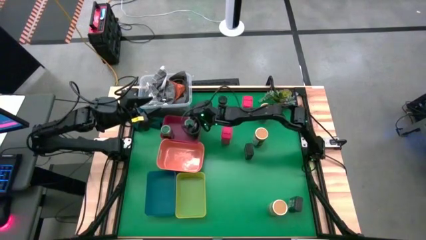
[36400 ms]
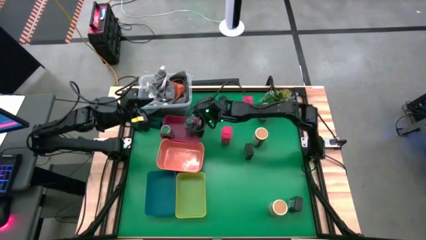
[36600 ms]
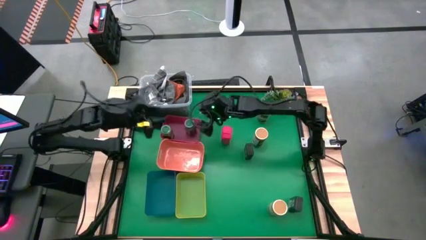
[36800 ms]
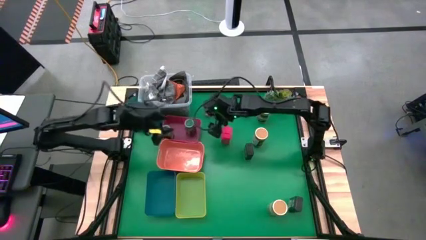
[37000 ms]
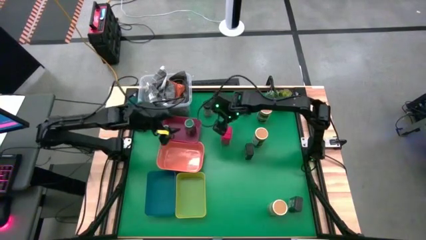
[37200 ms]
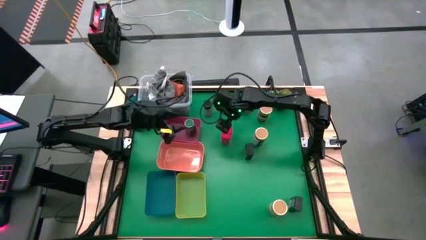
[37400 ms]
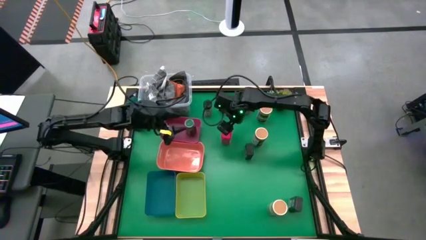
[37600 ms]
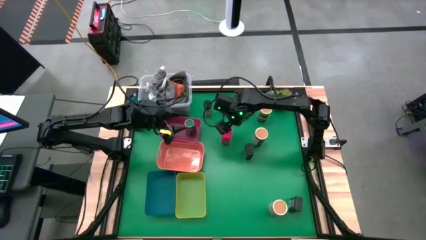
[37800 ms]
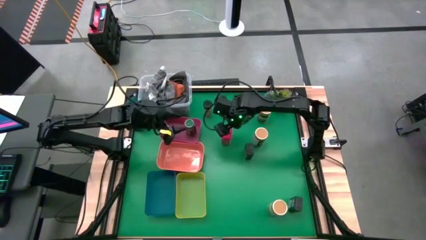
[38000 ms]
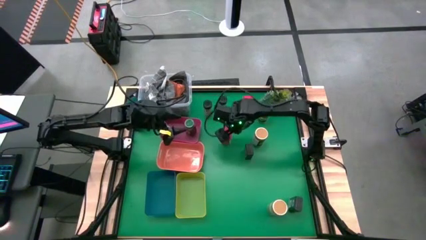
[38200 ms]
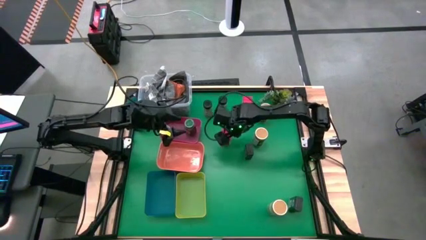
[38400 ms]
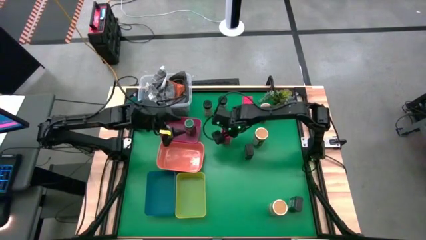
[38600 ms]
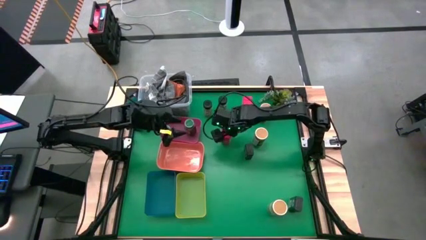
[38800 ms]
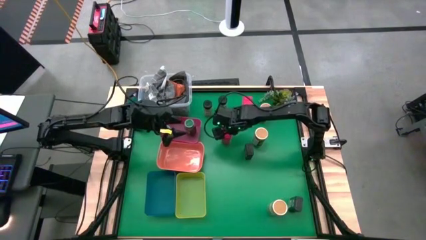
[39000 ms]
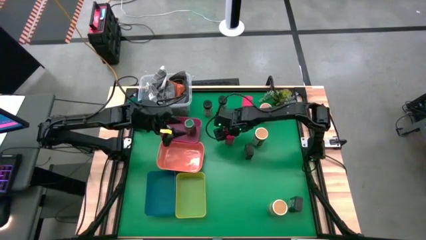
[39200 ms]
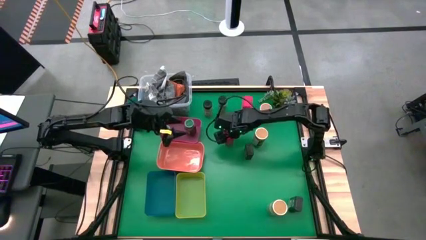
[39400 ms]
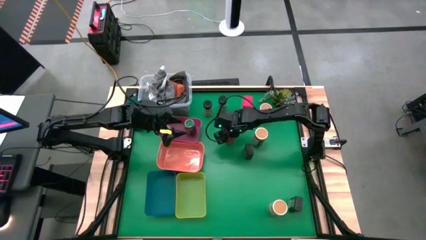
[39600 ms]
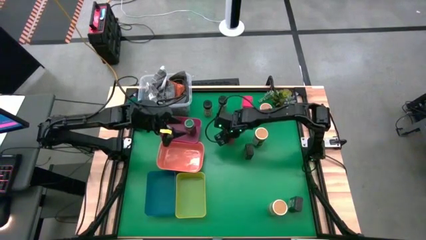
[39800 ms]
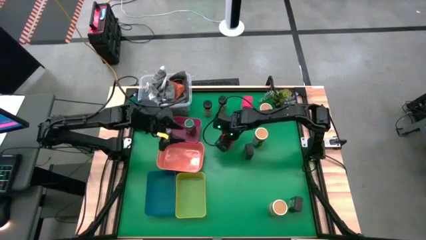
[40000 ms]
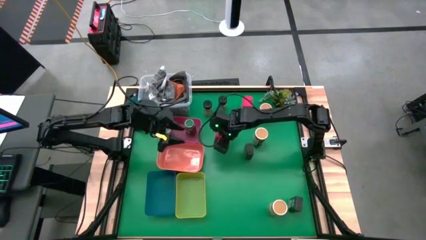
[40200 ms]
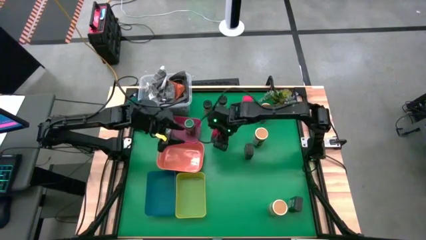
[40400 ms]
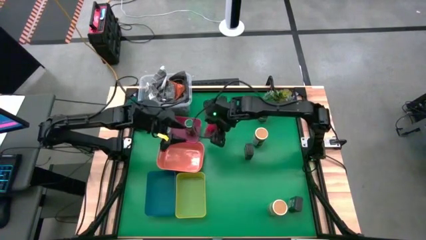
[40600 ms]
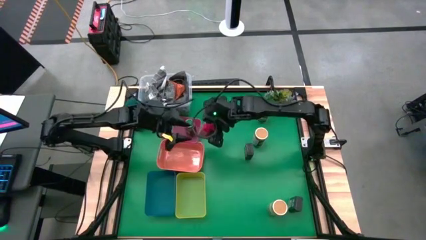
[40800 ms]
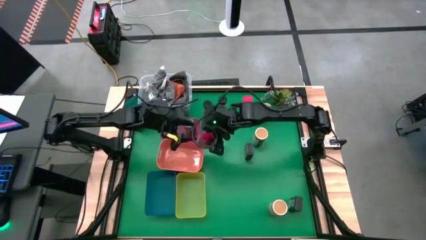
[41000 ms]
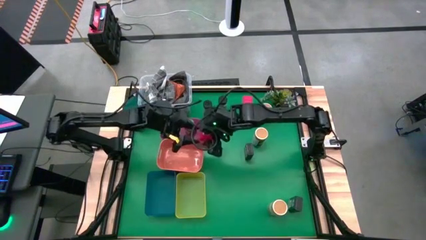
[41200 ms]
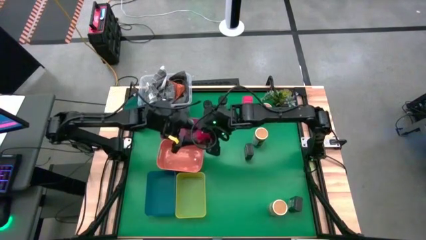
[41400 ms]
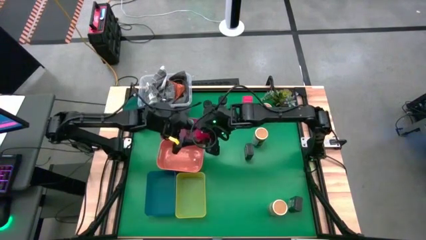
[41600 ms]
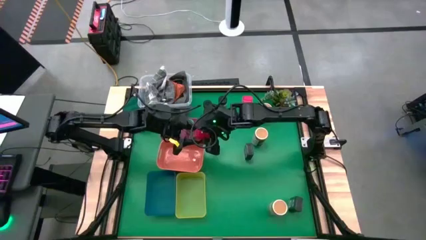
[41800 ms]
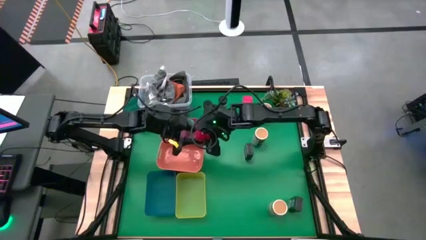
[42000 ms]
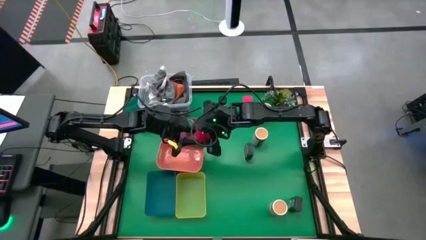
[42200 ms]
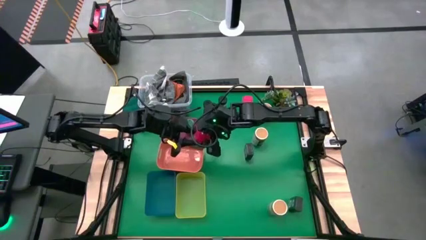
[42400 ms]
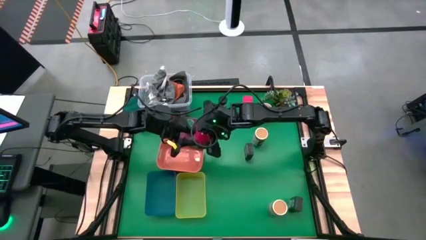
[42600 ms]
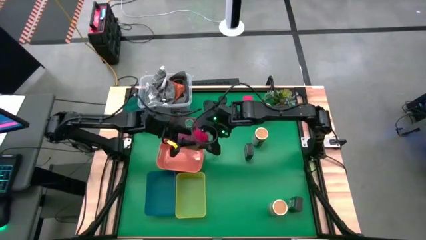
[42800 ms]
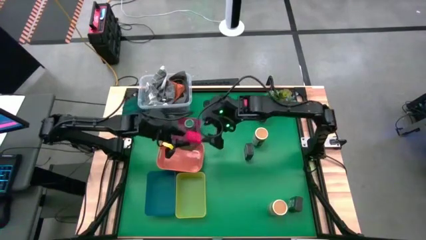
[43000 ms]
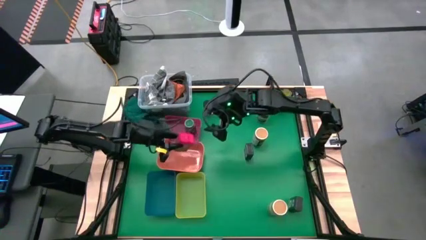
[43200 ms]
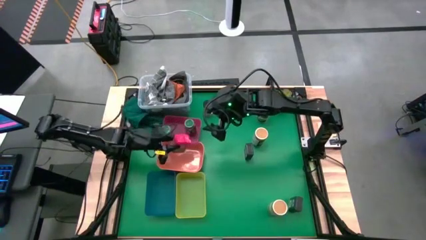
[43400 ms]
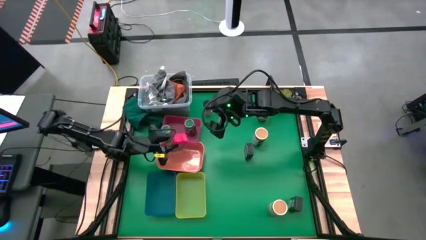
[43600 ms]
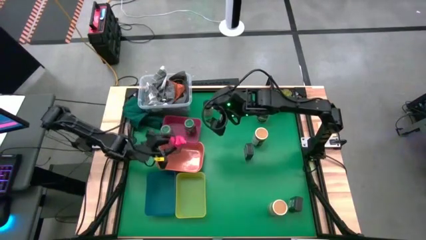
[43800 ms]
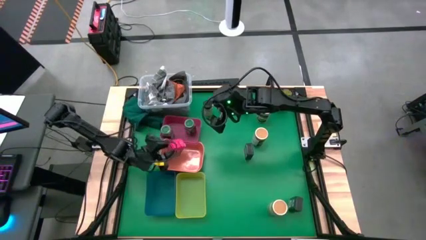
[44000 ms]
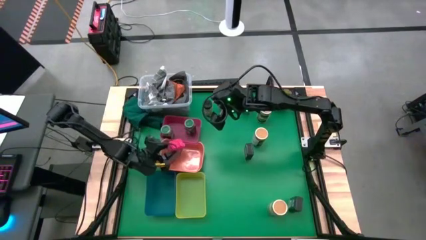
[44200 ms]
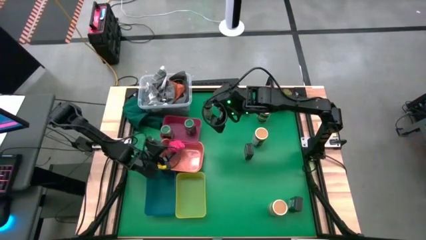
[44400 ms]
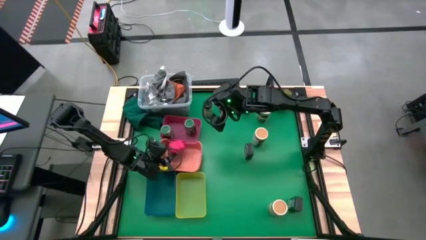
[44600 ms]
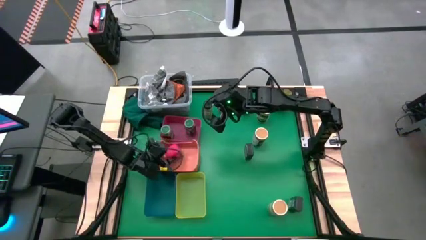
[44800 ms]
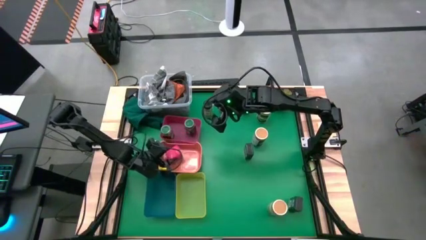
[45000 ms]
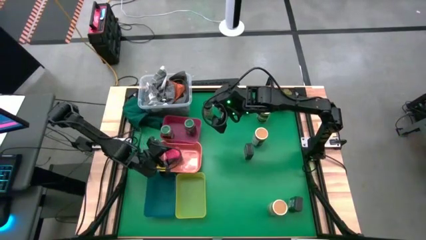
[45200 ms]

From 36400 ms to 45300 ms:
Task: Sort spices by type
Put the bottom red seasoning can into the orange bin

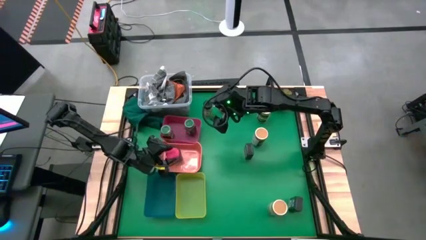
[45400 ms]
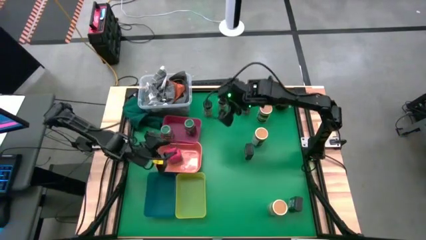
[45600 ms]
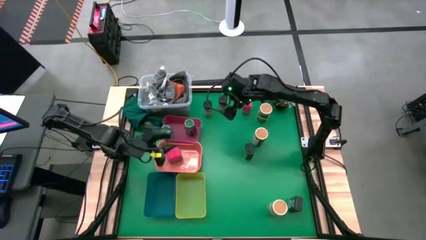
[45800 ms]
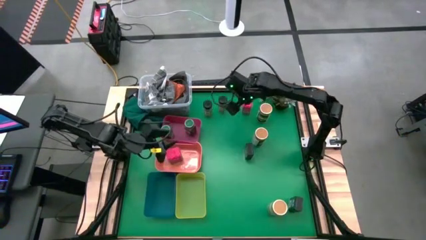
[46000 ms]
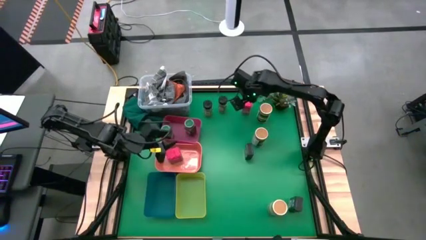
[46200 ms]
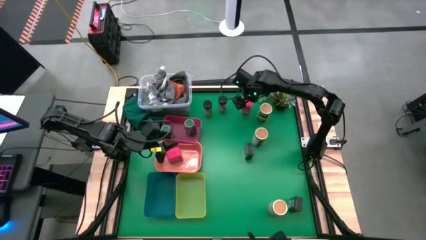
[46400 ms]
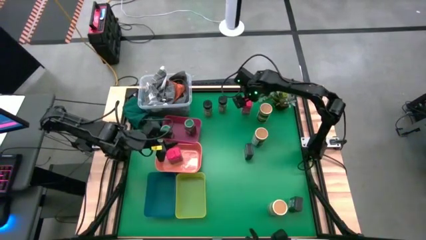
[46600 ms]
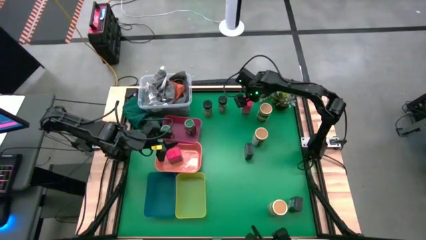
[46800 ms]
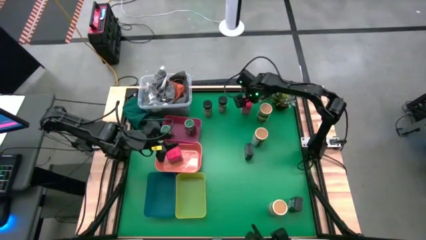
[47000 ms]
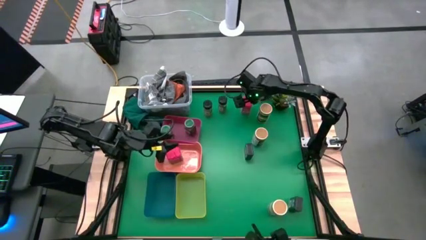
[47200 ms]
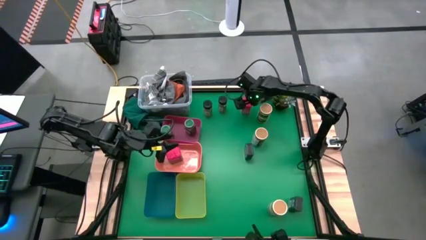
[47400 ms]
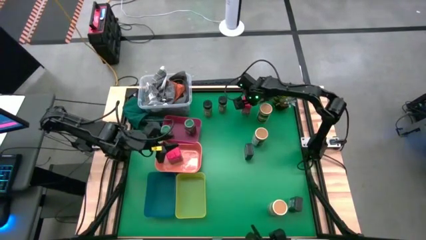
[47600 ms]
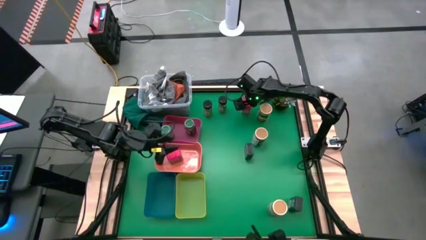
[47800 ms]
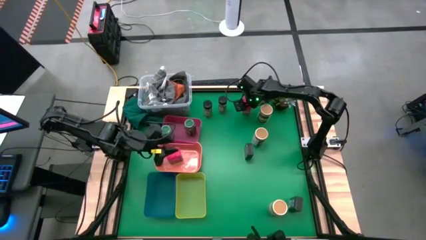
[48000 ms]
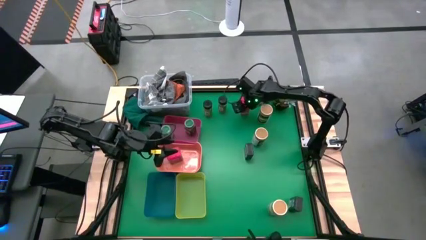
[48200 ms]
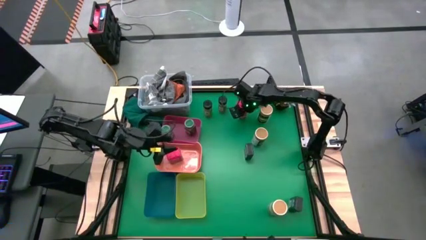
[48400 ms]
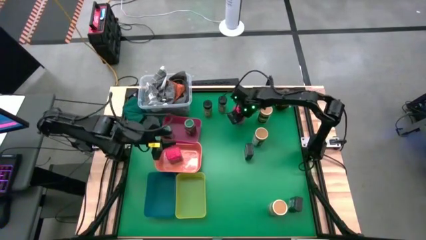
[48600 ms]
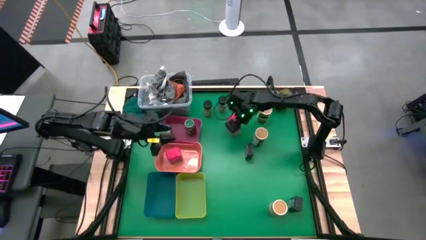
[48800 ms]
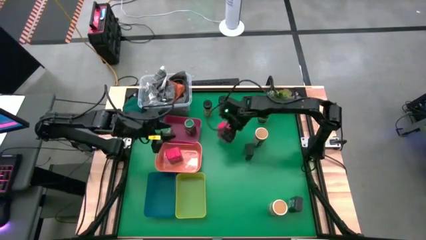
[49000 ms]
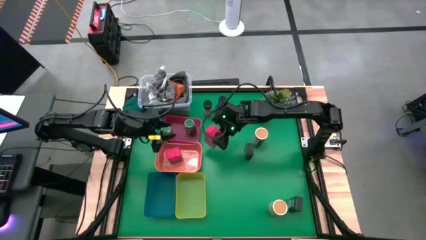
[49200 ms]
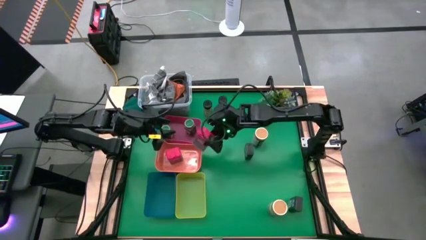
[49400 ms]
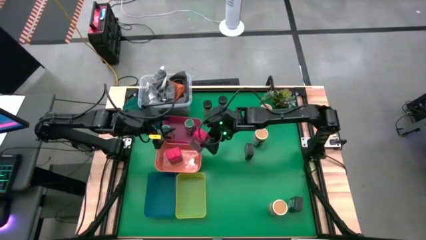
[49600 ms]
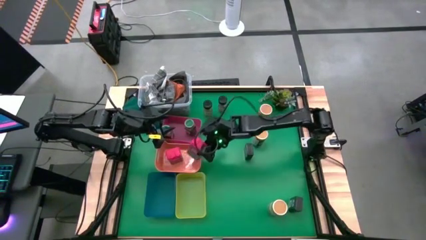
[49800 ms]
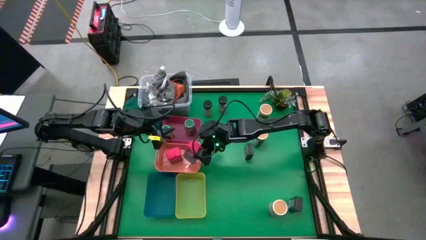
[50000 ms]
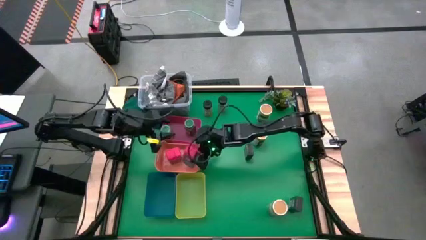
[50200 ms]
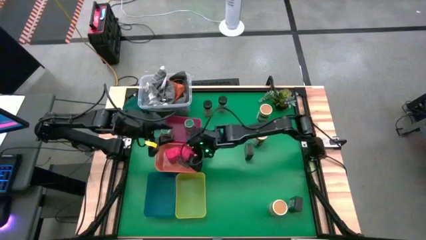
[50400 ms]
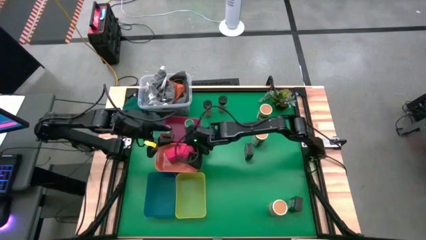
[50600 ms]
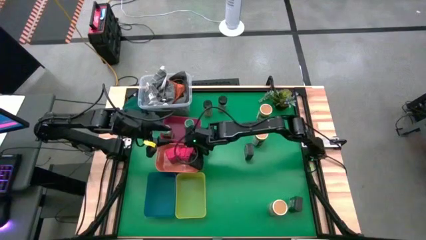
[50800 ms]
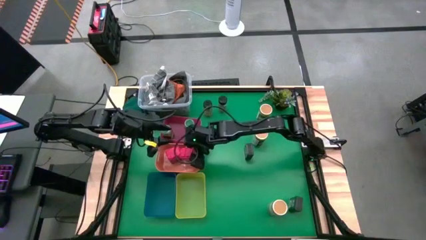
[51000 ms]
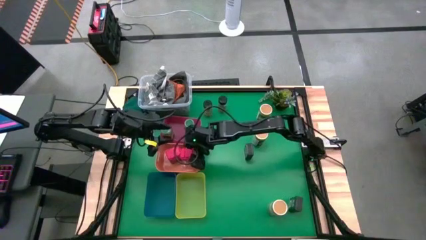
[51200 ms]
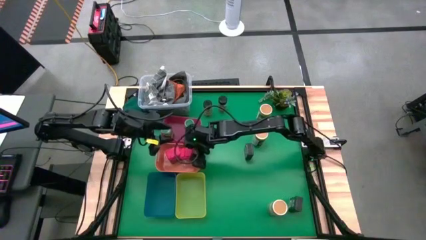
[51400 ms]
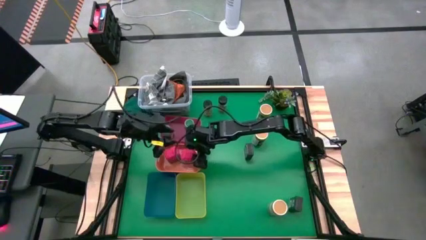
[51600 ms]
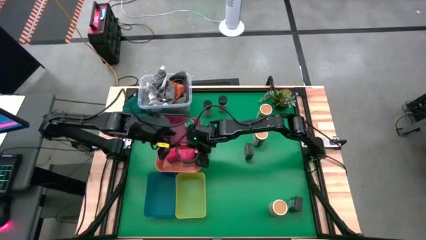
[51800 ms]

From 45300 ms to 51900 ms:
Put the red seasoning can into the orange bin

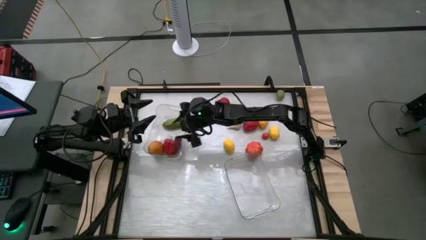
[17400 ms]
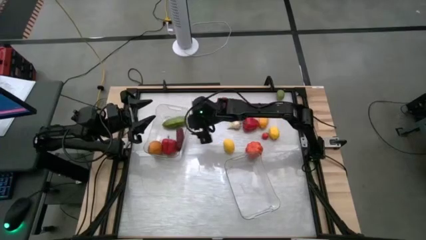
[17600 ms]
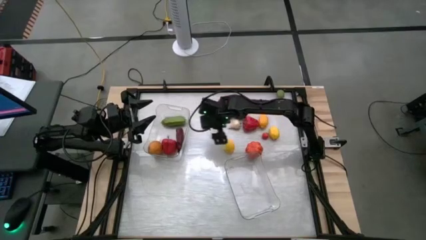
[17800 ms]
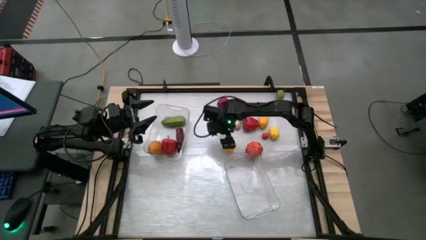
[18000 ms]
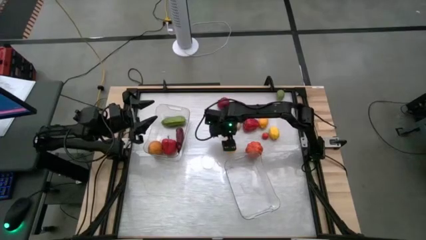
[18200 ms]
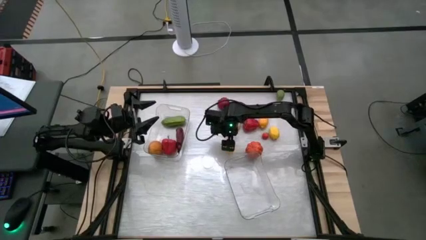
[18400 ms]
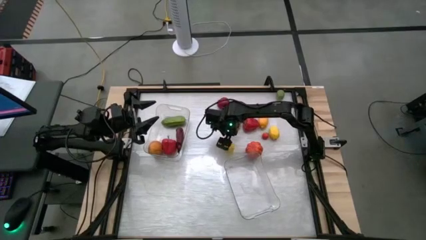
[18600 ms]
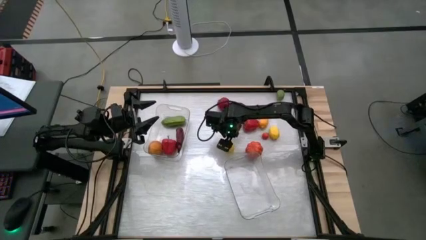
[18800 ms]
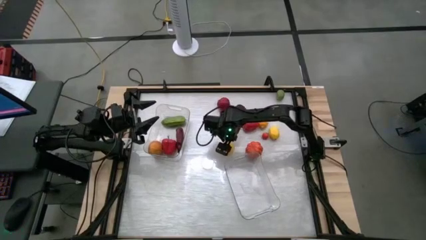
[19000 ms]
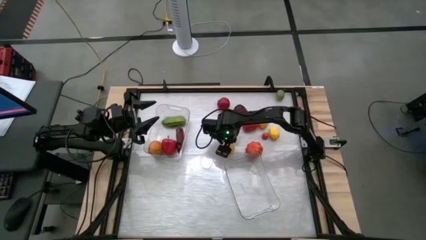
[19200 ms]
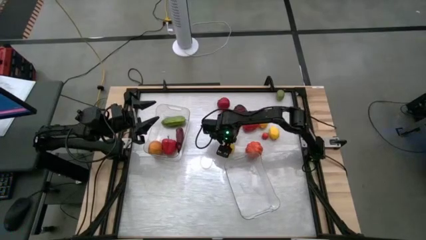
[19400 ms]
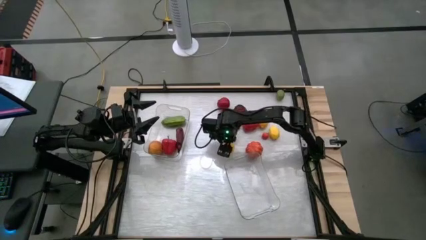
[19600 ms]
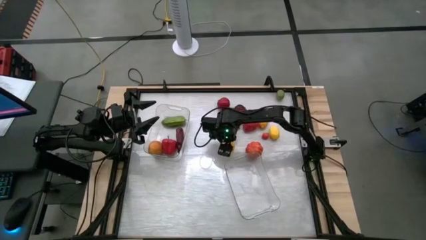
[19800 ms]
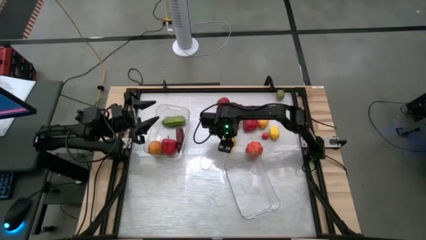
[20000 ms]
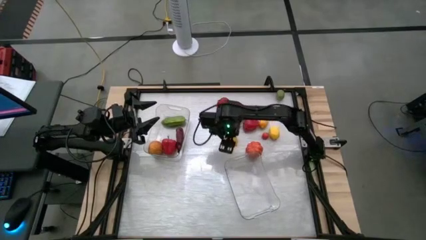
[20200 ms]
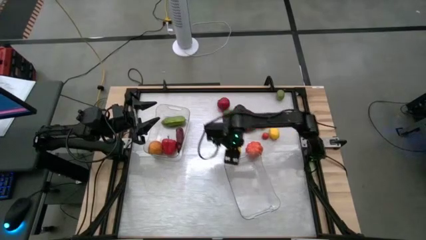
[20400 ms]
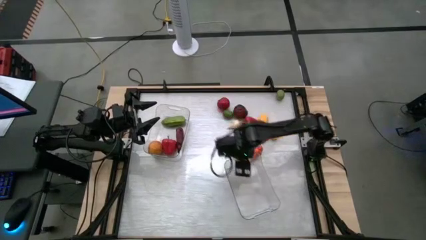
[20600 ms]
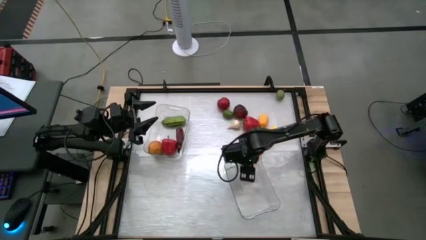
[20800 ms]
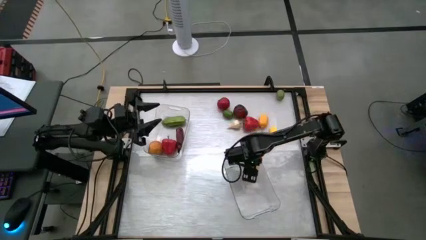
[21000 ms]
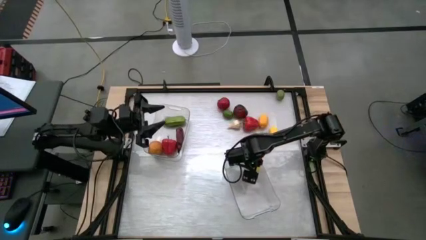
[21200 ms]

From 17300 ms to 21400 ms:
Task: Sort produce into baskets
Put the bottom left yellow lemon into the right transparent bin
